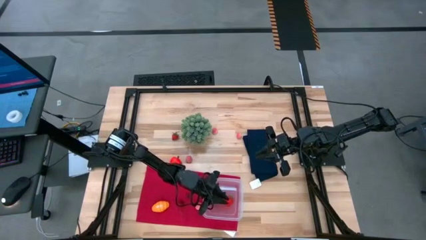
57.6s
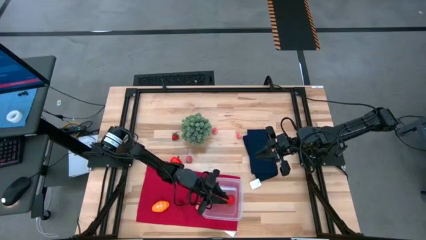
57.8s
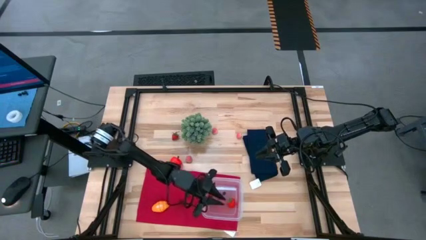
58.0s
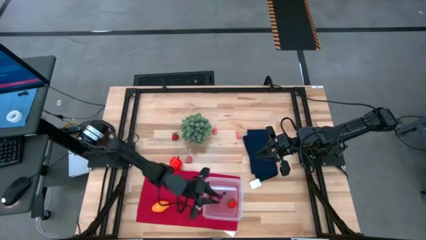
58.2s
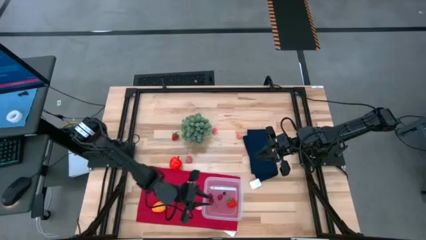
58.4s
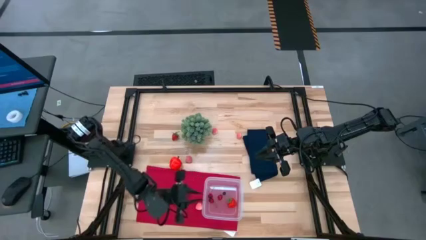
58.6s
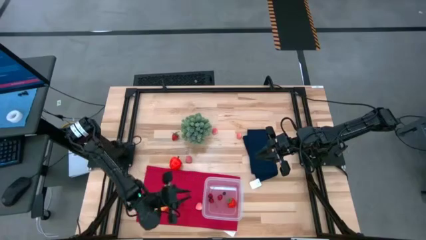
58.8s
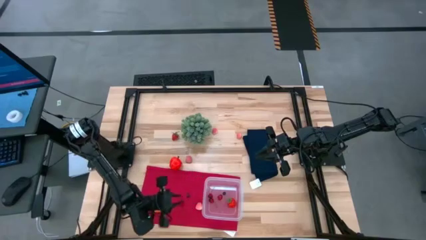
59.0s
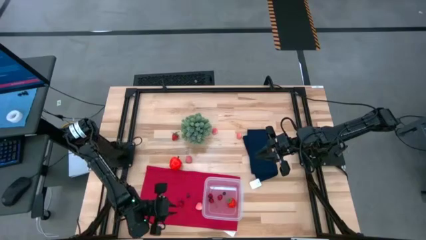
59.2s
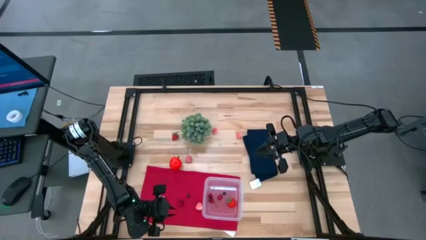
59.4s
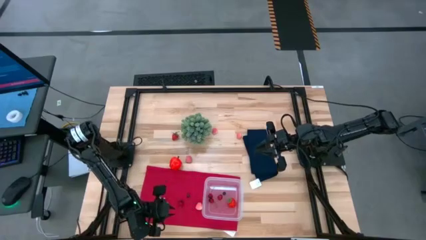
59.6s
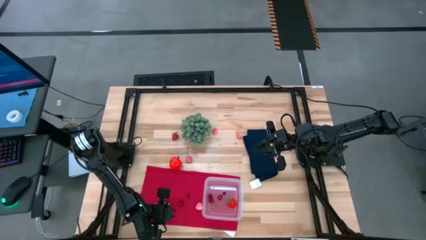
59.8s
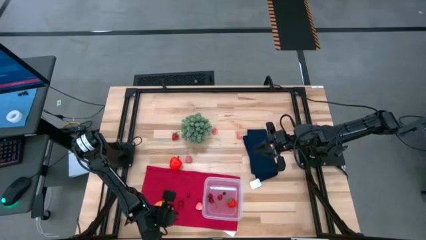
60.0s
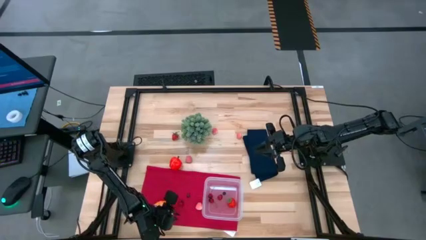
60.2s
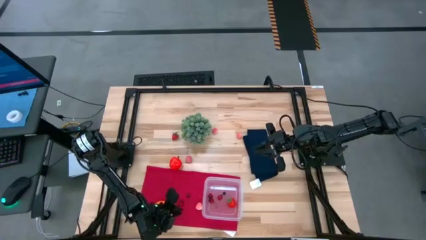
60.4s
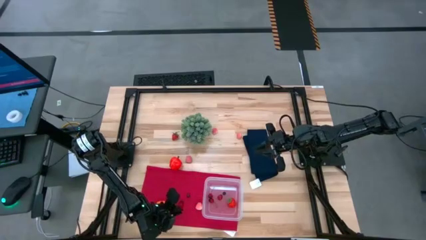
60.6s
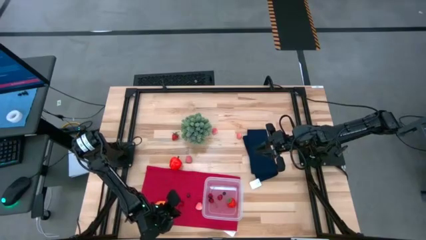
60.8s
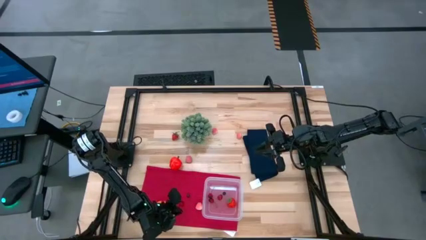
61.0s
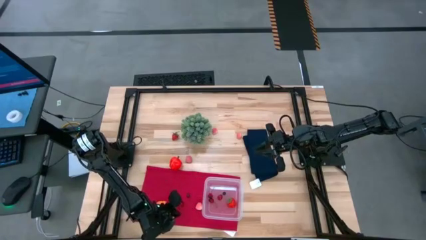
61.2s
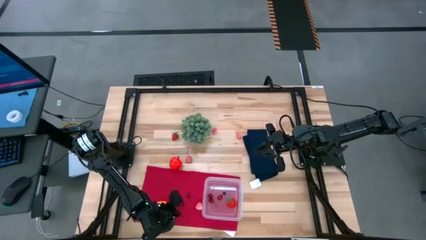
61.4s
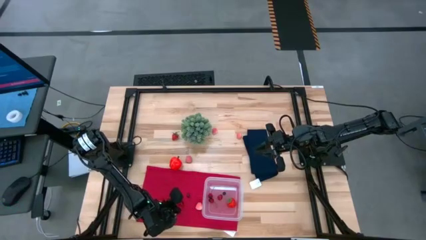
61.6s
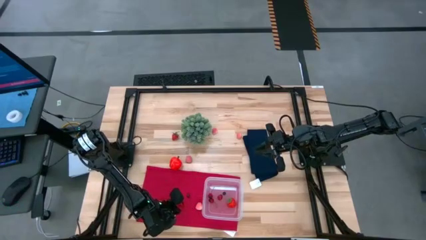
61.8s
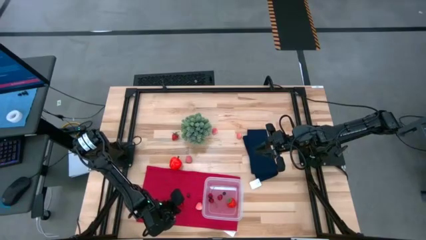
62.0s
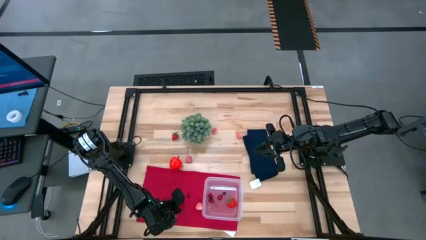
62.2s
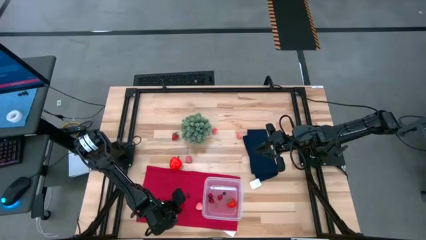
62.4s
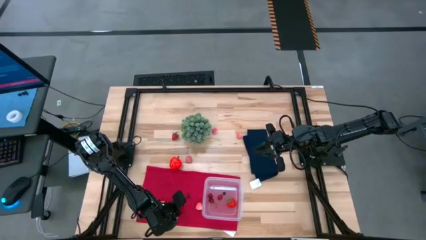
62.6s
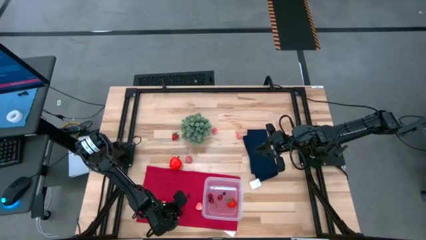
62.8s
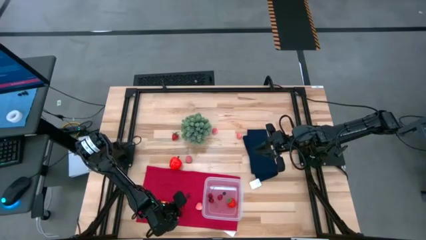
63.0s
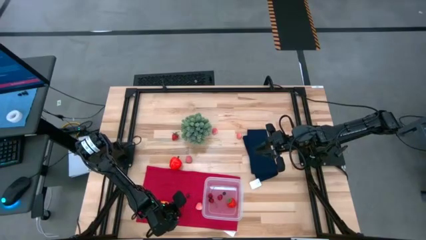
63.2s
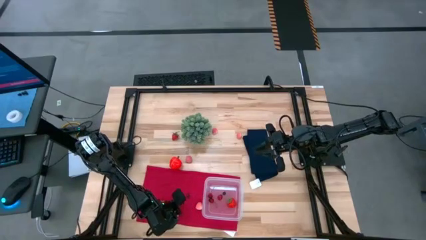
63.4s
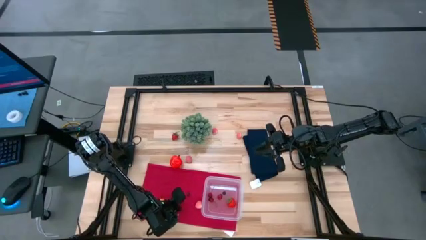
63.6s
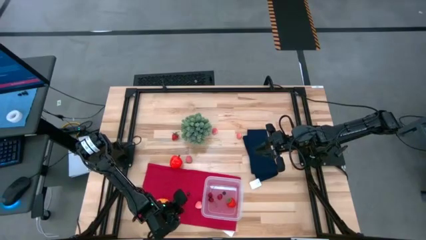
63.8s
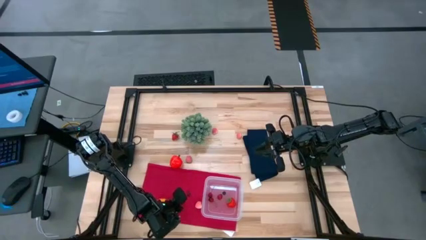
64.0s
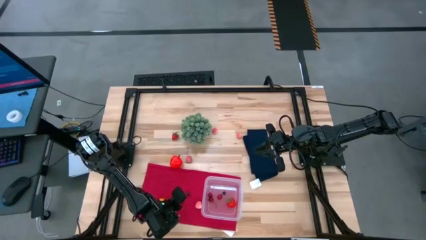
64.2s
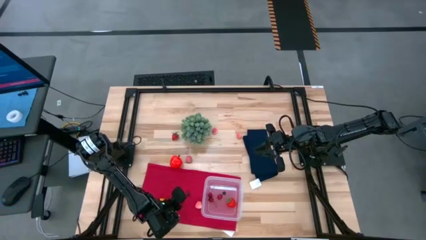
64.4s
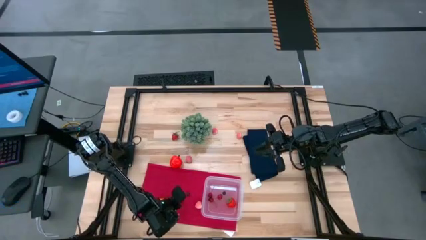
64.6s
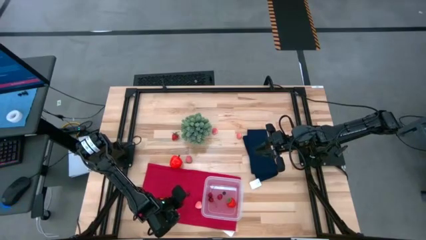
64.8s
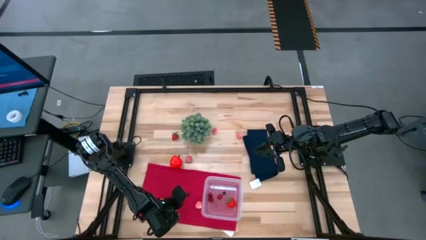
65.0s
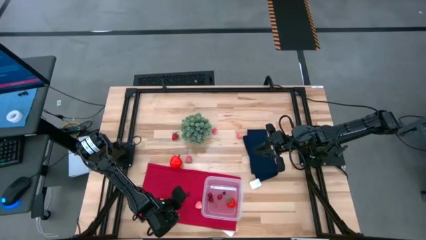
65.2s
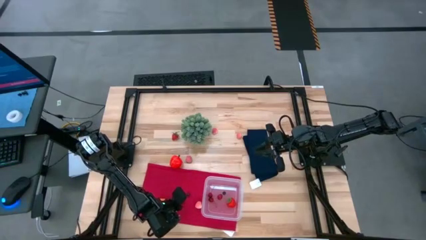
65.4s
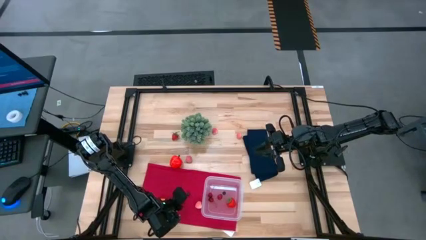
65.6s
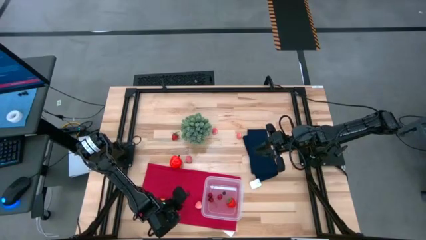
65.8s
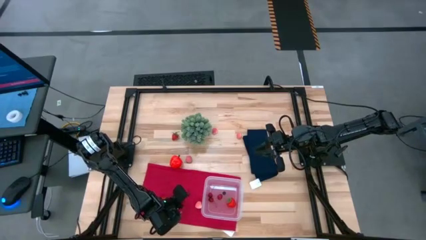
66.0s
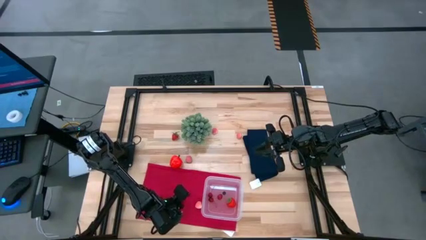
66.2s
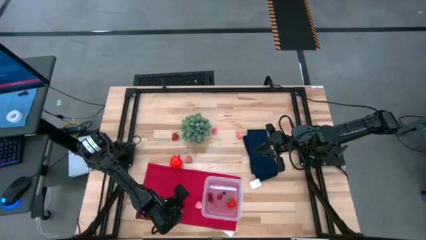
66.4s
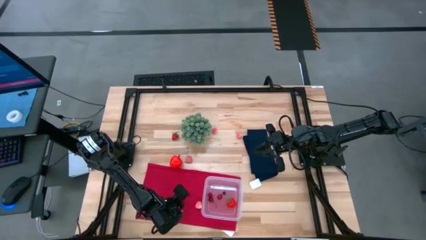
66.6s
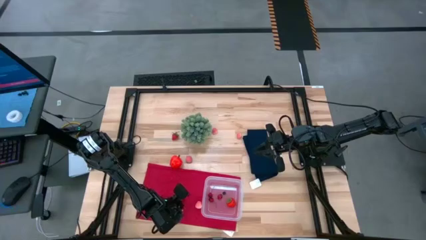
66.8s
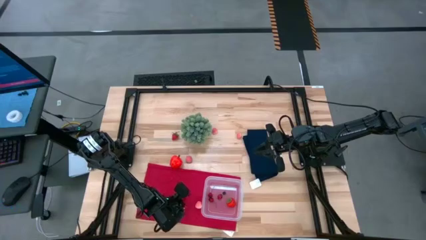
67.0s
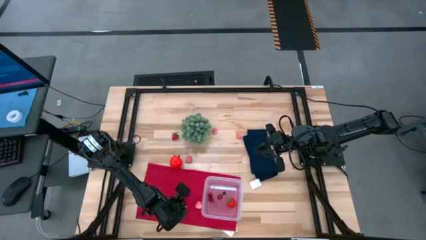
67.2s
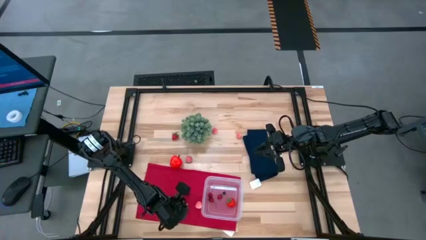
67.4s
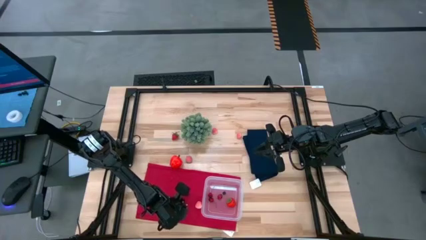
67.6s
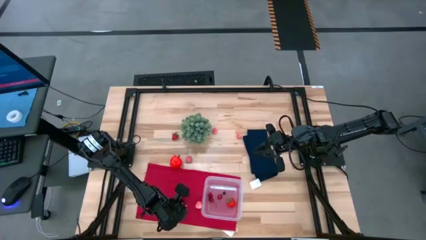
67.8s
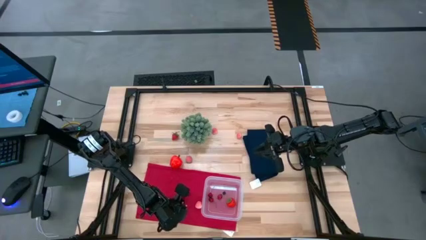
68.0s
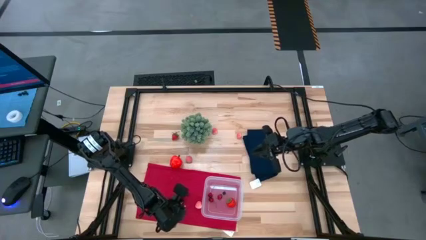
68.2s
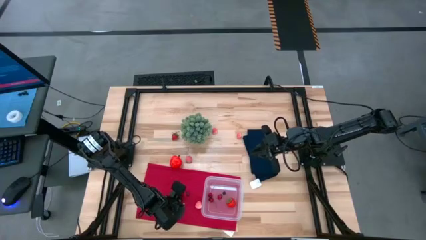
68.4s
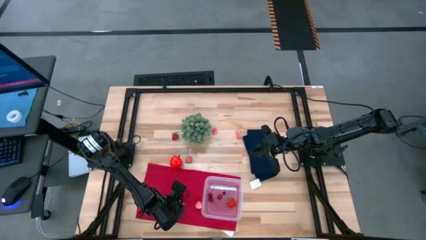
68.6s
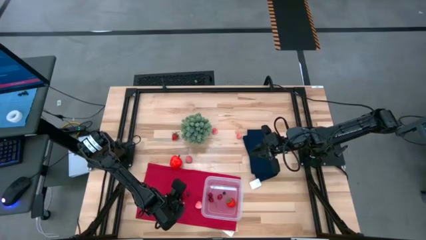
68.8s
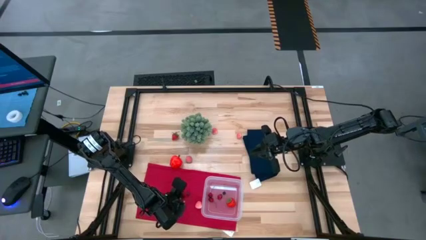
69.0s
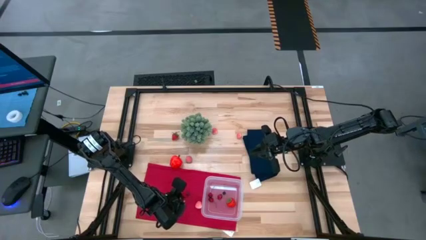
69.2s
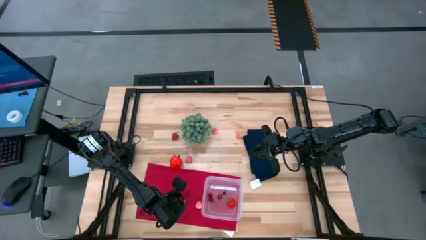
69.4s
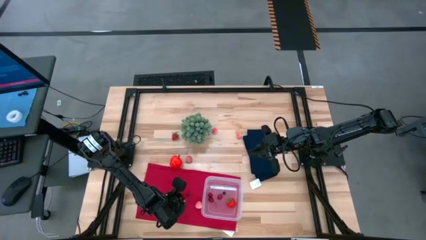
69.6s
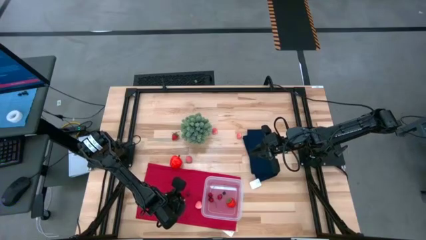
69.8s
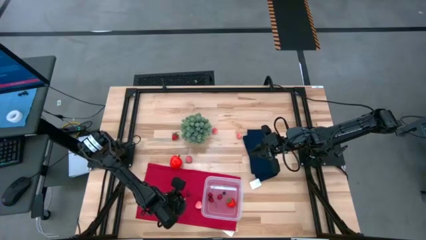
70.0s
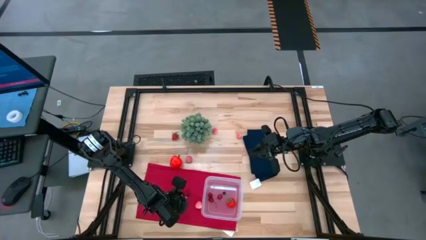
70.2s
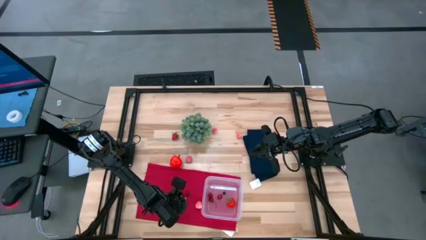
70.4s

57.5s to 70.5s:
Task: Pick and placing Produce into tupperware
Put the cherry into the transparent bin

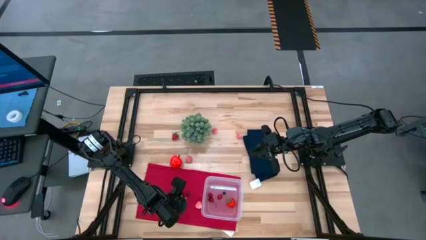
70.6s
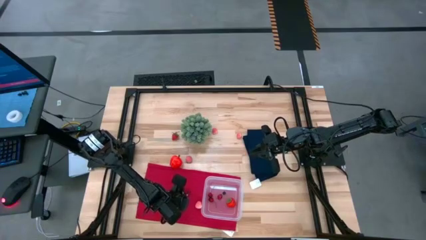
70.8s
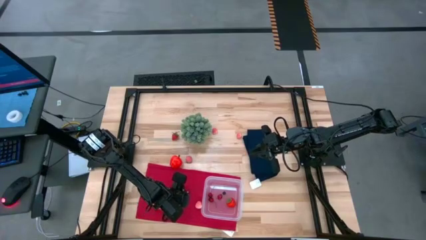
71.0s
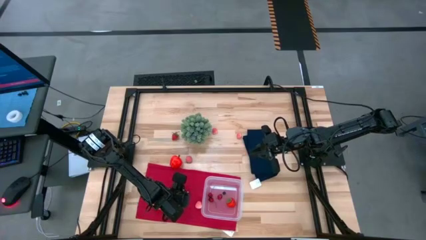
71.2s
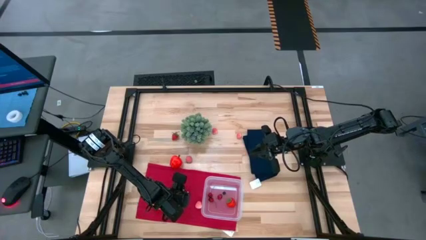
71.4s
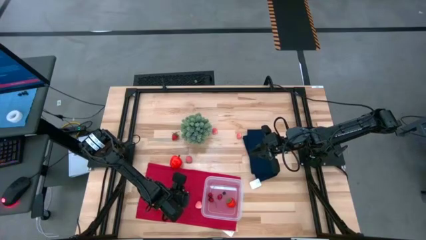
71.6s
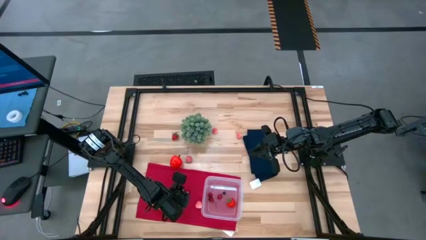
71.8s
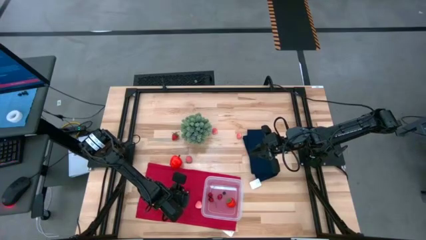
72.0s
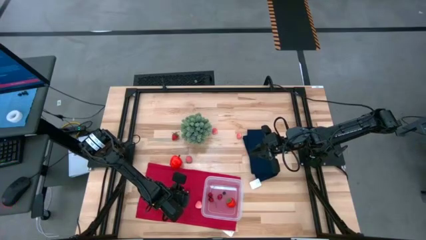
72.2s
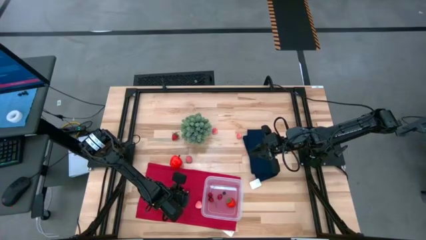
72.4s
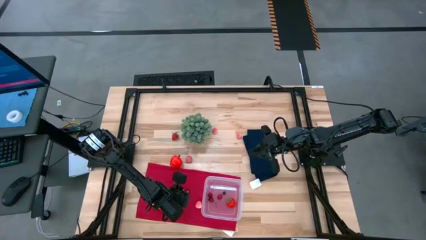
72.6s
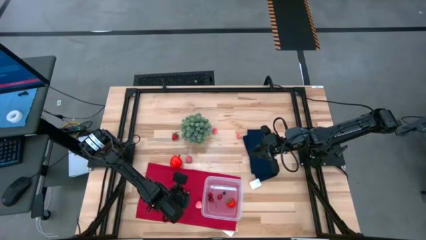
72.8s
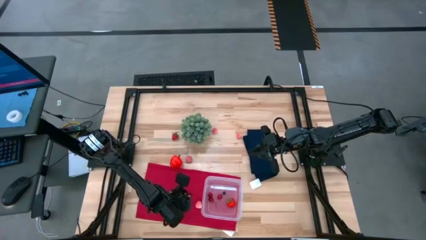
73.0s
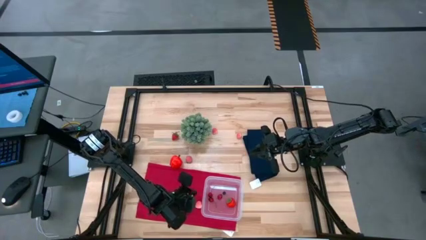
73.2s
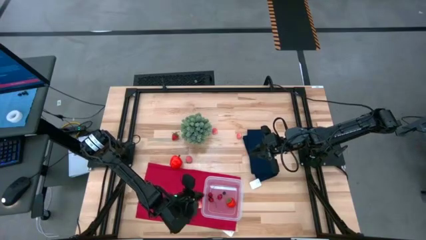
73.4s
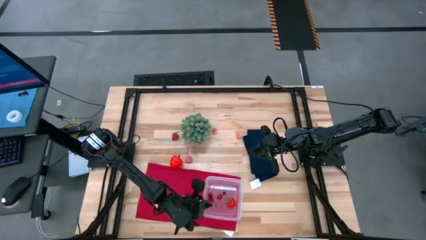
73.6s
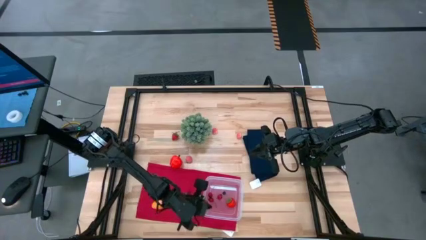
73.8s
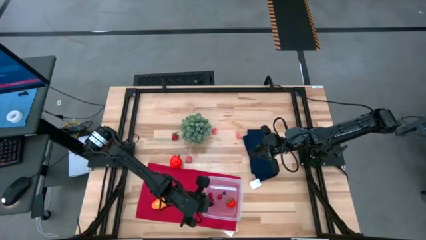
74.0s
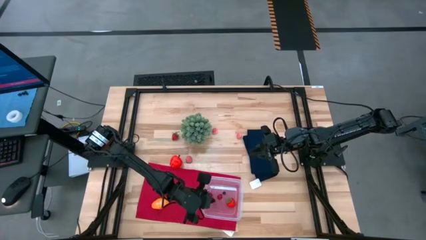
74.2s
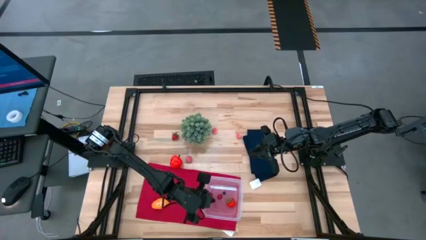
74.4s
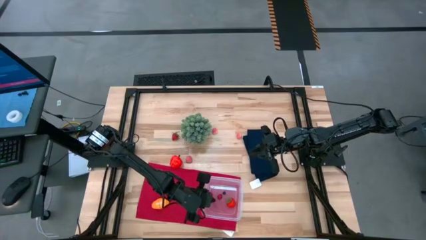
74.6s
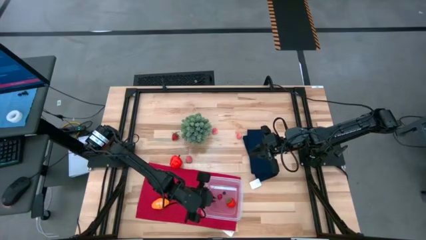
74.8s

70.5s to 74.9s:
Put the cherry into the transparent bin
